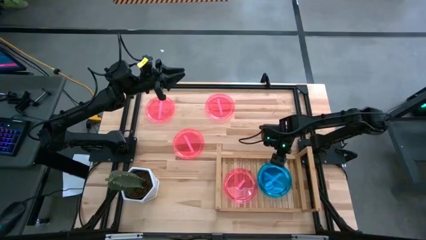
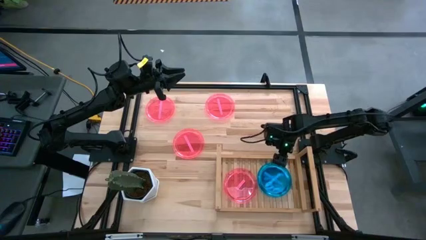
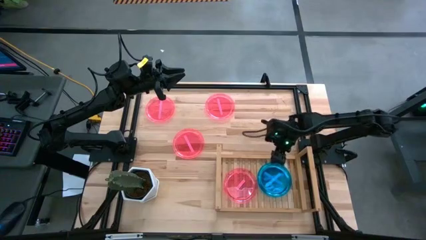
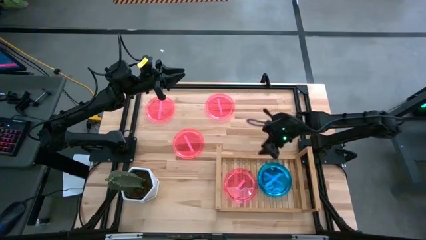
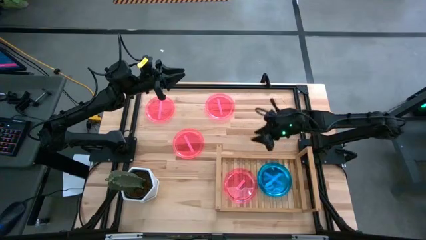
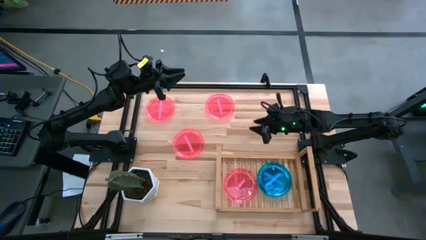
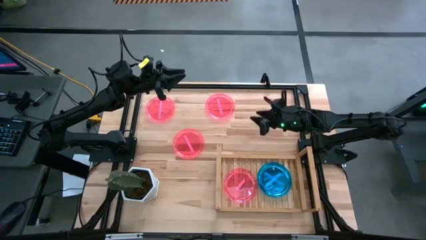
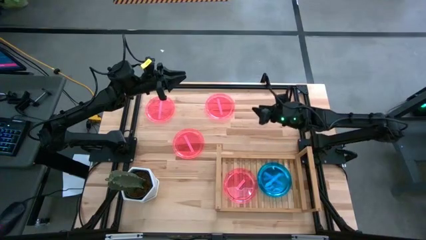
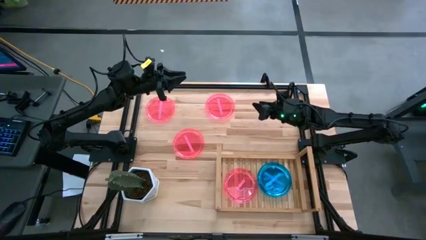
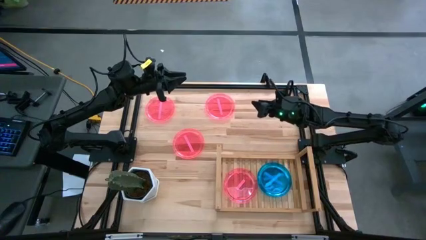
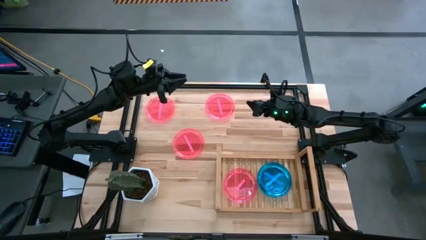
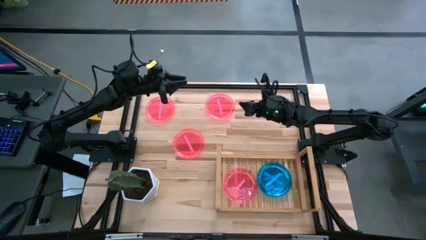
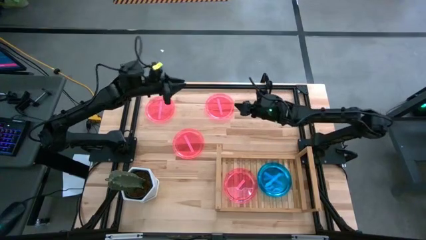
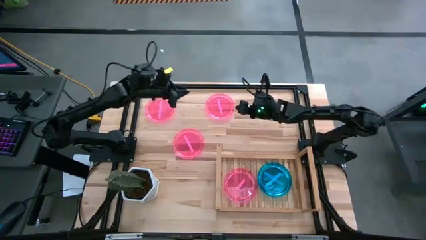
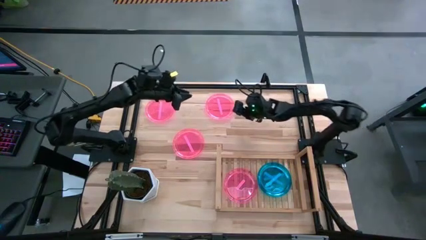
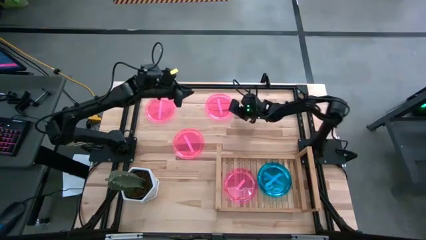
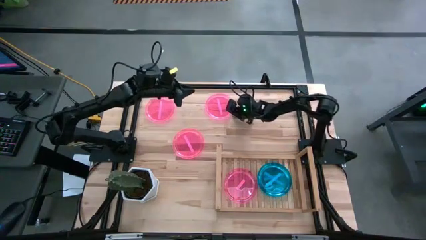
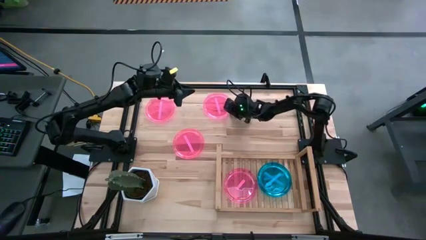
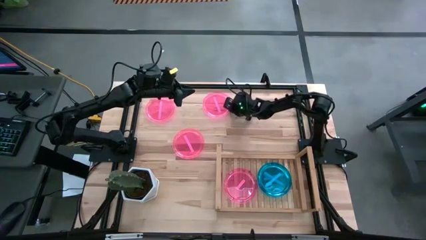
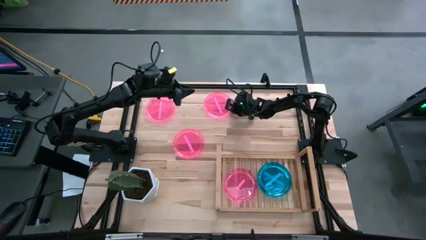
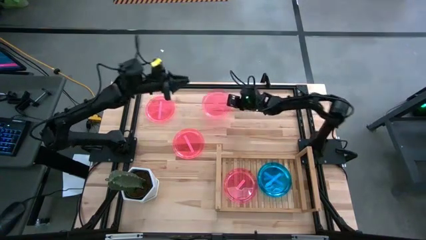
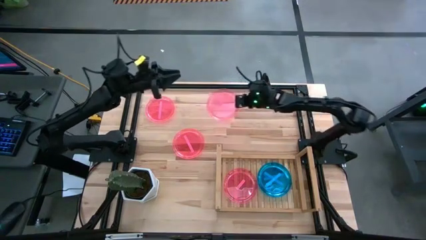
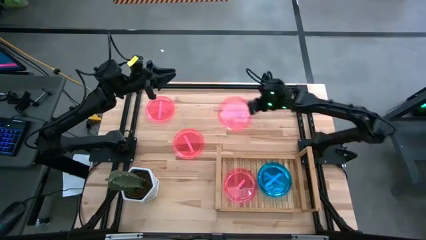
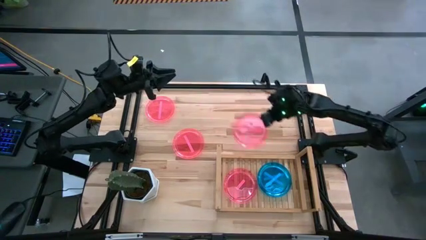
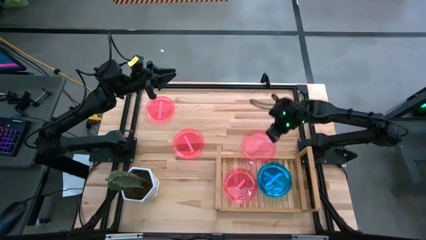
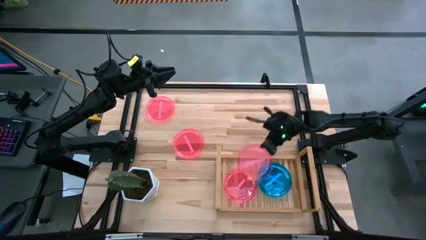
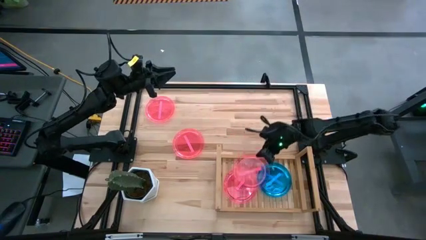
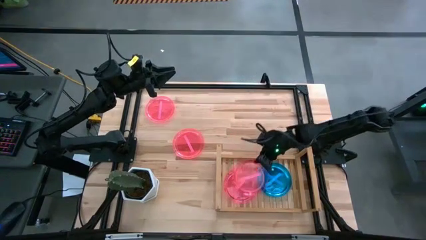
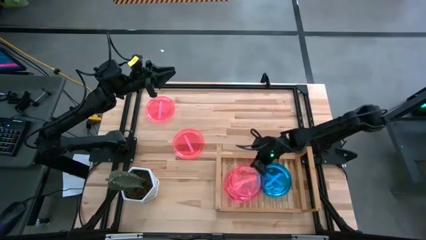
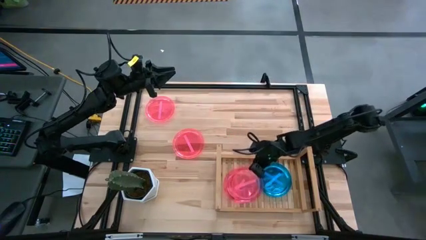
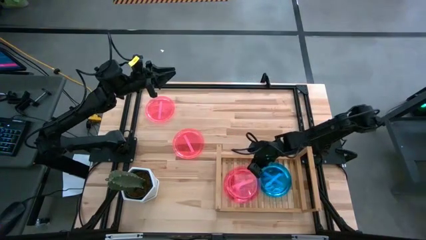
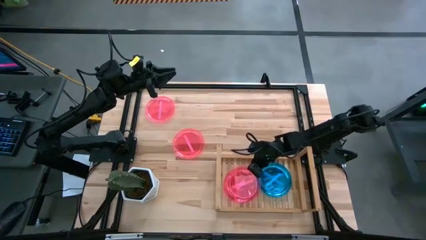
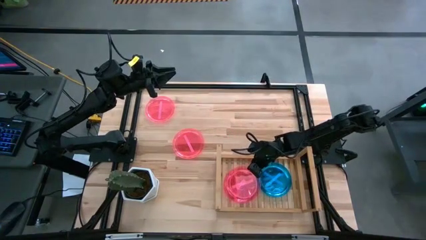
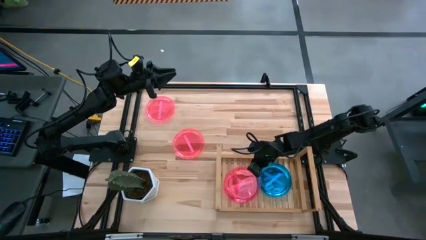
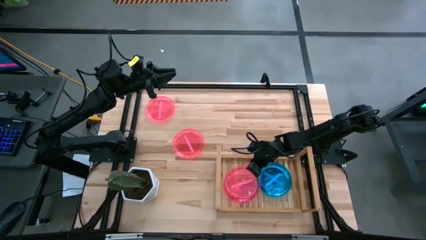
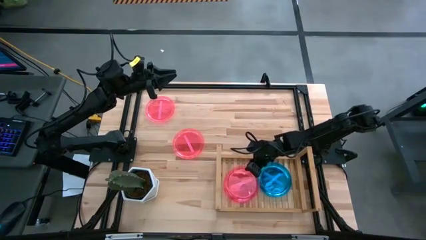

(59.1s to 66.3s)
Task: Place and stack plates onto a shelf
Stack the pink plate on top of the pink plate on the shelf

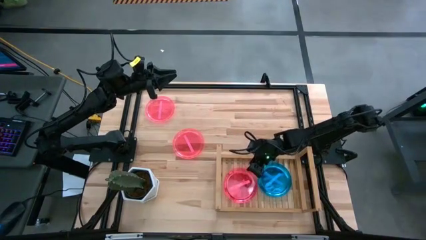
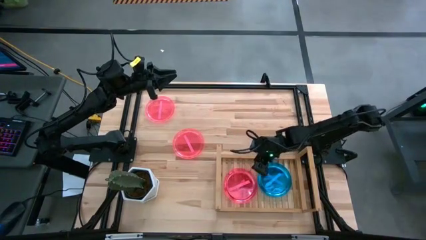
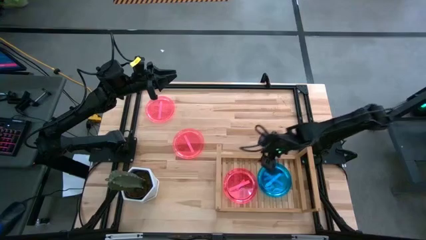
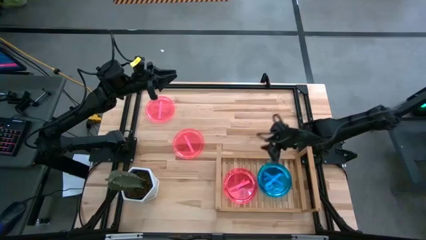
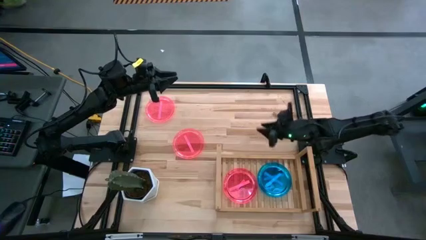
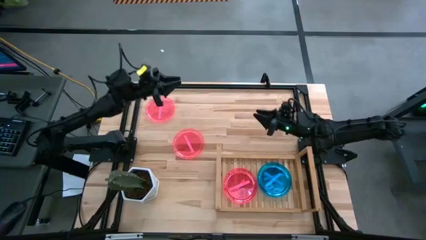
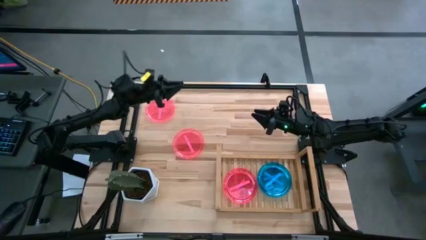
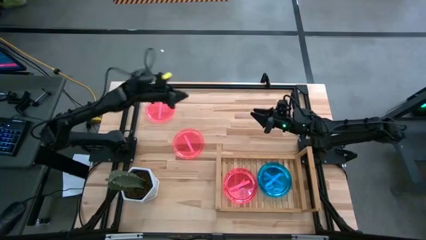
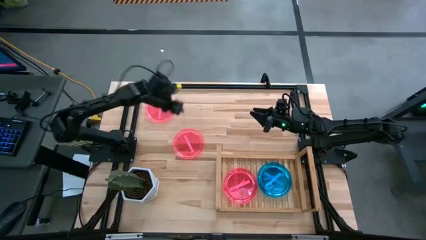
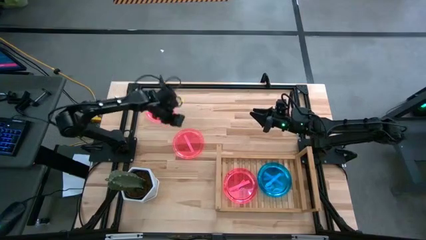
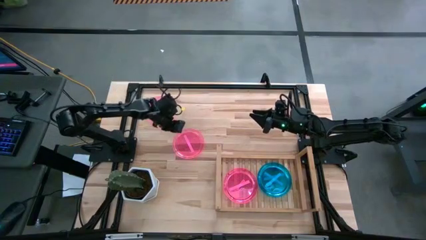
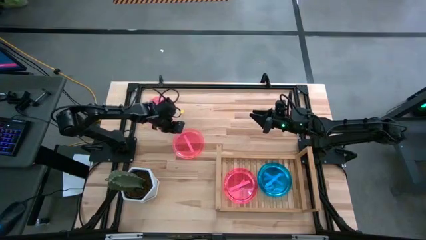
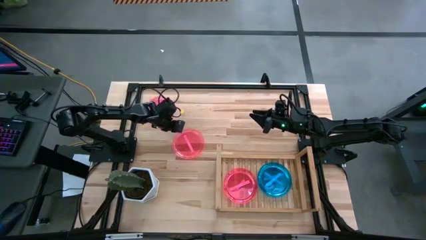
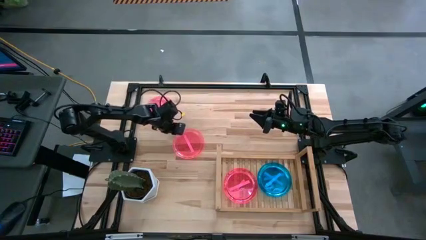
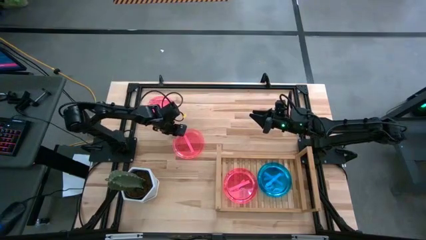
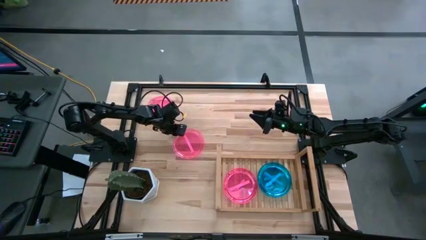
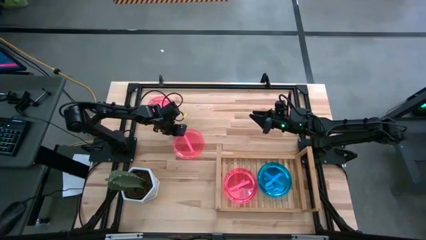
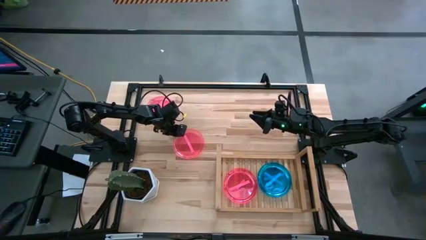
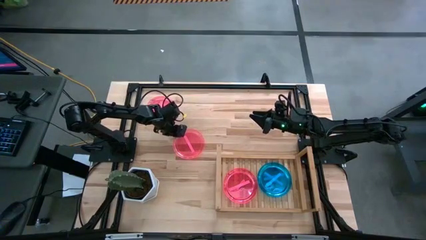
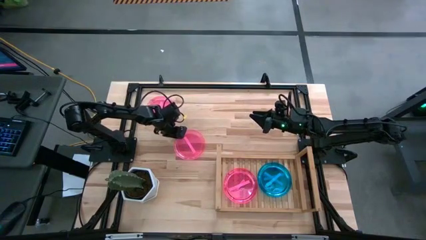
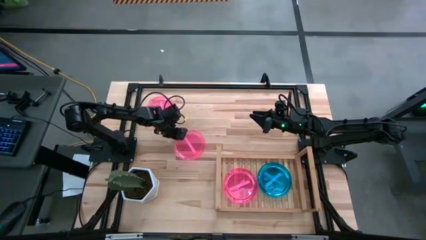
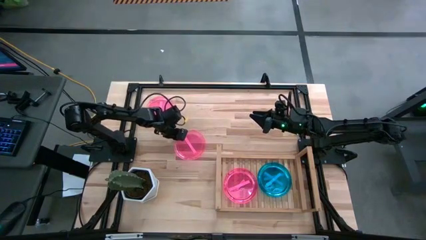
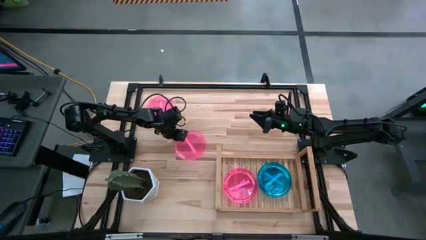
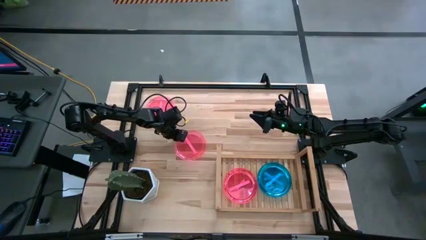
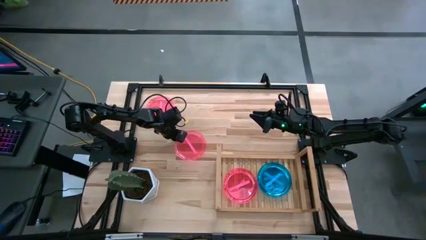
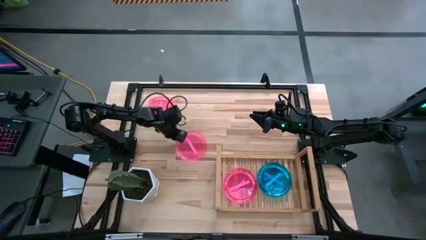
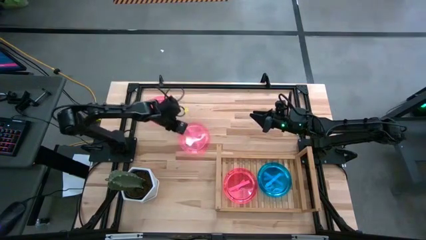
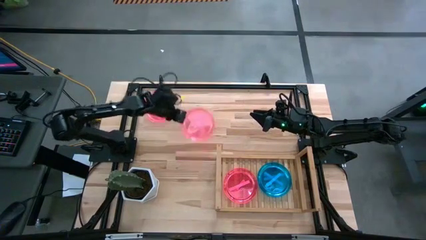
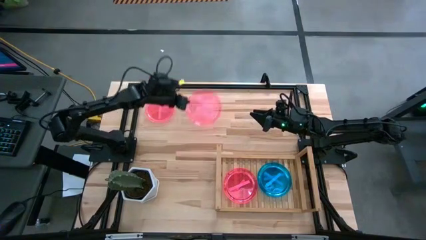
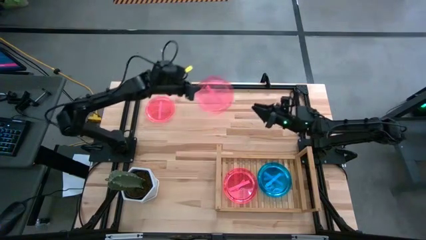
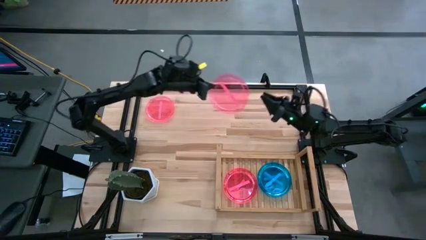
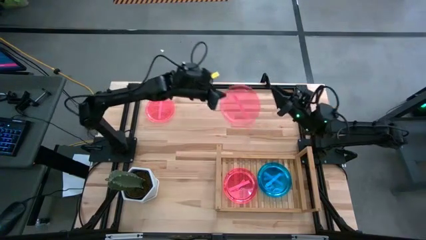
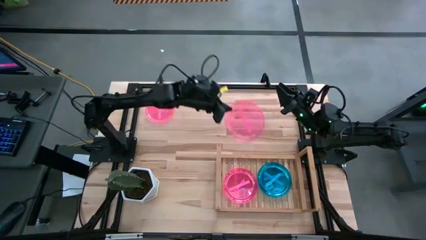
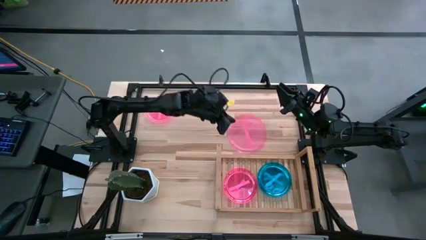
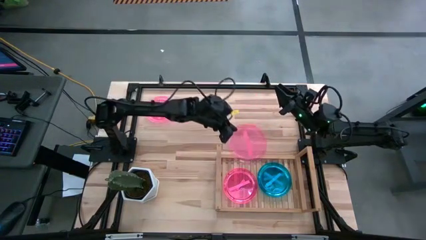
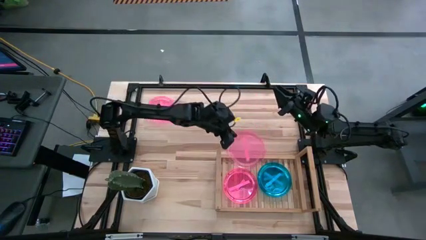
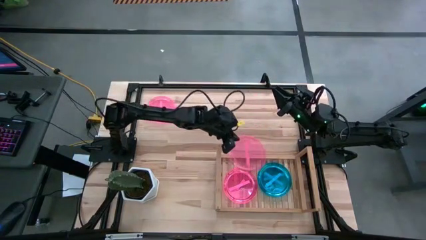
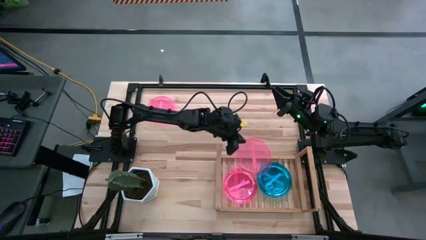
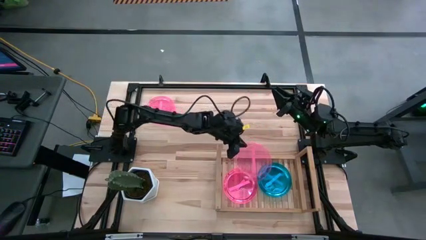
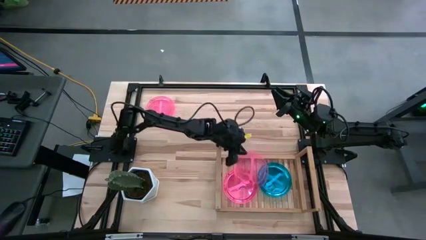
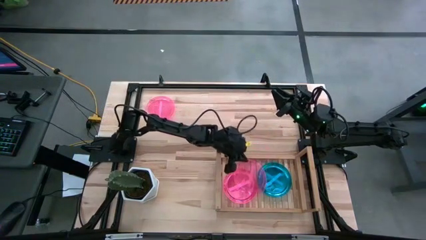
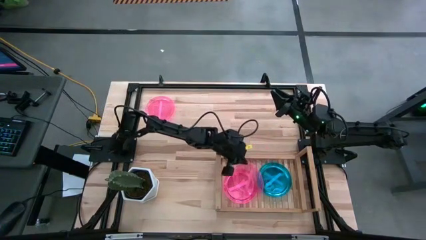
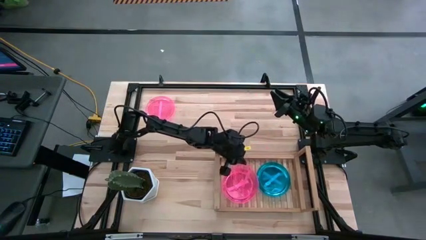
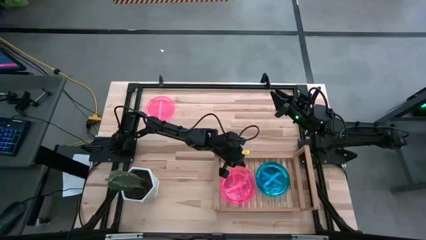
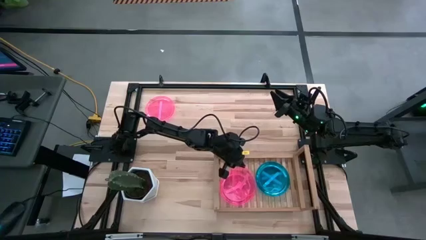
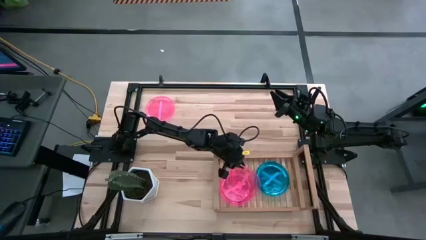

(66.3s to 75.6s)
Stack the pink plate on top of the pink plates on the shelf
